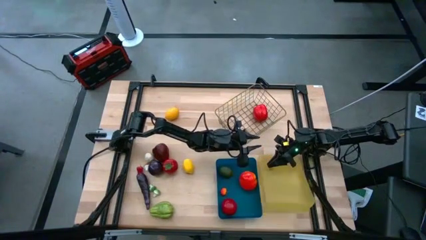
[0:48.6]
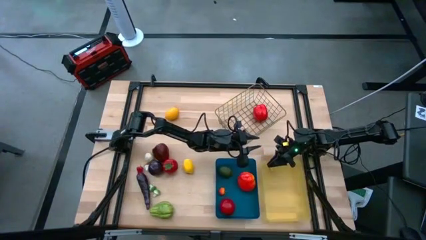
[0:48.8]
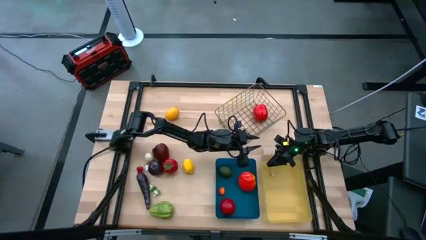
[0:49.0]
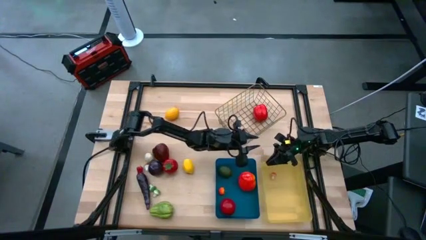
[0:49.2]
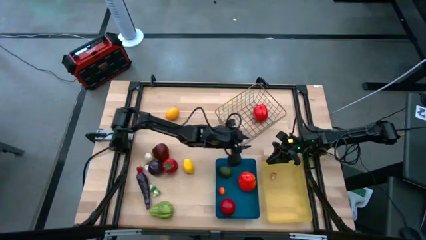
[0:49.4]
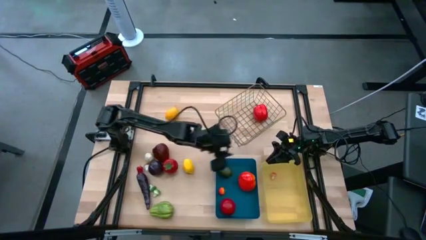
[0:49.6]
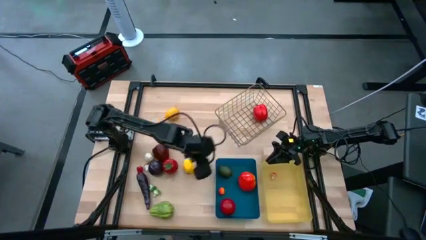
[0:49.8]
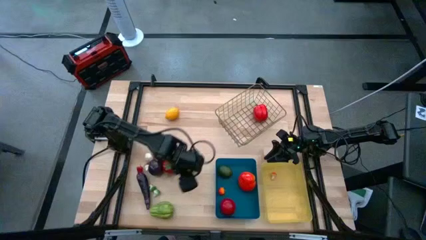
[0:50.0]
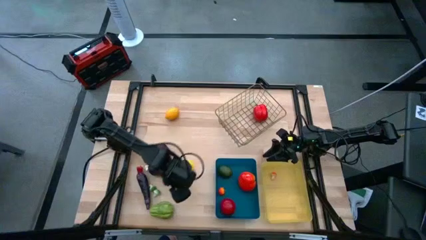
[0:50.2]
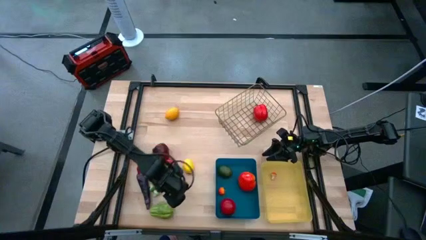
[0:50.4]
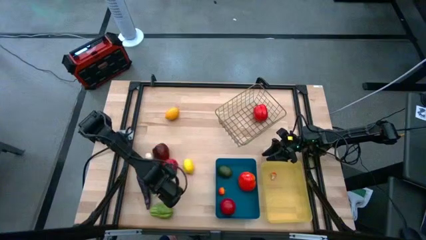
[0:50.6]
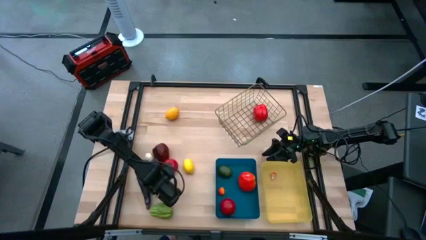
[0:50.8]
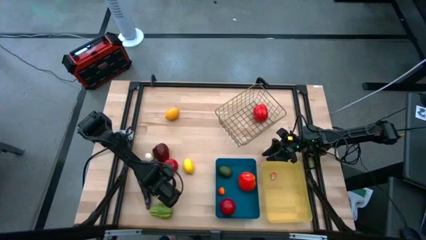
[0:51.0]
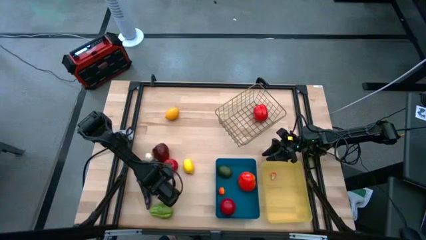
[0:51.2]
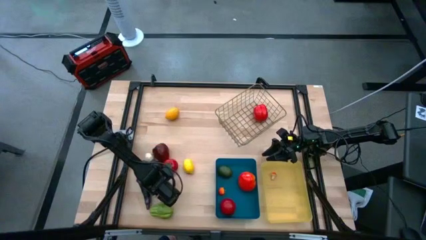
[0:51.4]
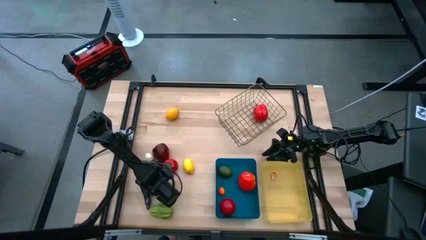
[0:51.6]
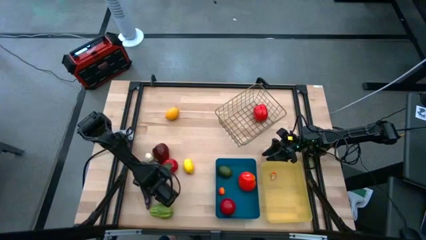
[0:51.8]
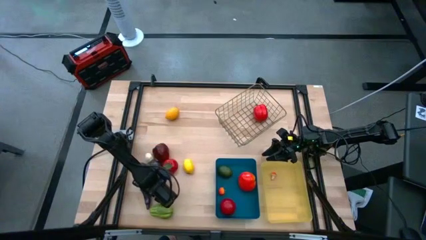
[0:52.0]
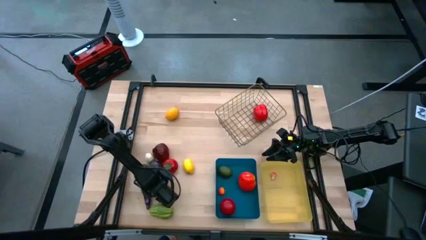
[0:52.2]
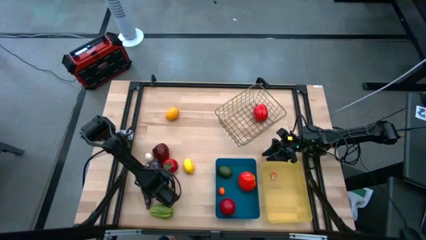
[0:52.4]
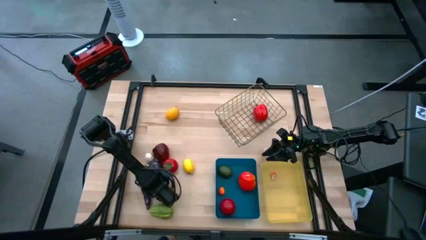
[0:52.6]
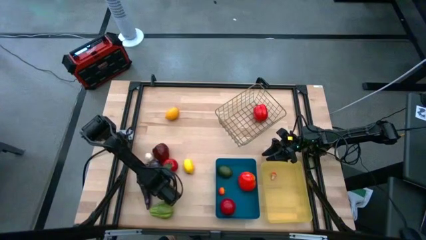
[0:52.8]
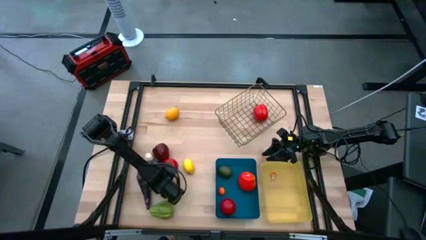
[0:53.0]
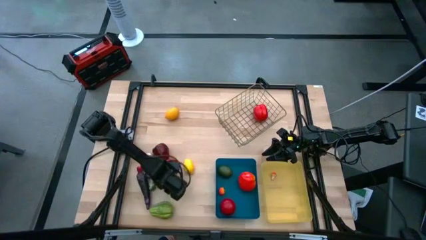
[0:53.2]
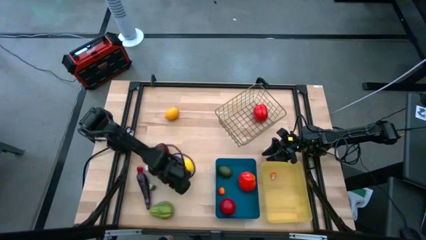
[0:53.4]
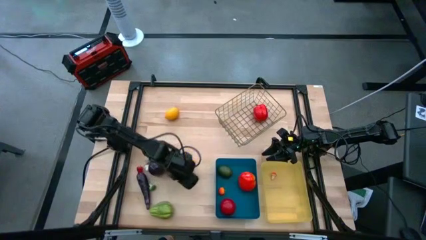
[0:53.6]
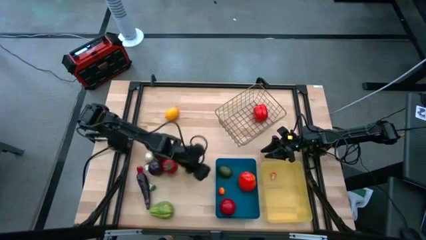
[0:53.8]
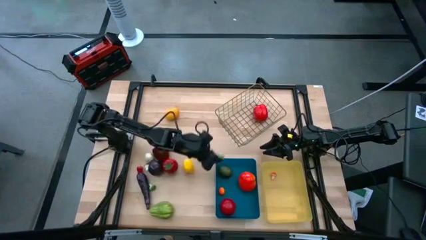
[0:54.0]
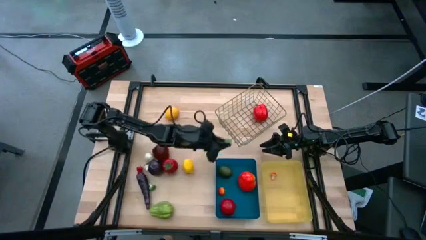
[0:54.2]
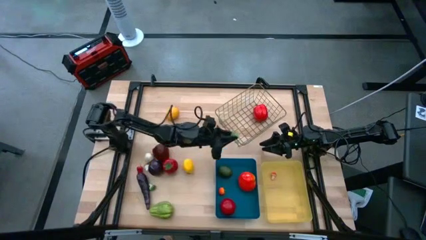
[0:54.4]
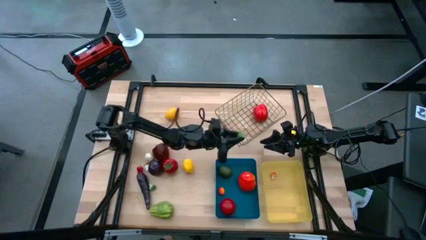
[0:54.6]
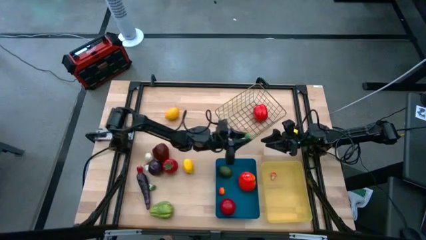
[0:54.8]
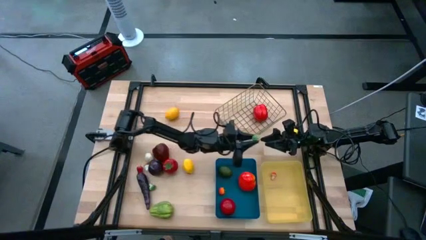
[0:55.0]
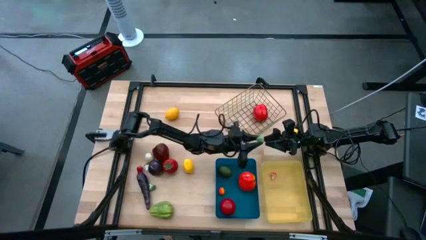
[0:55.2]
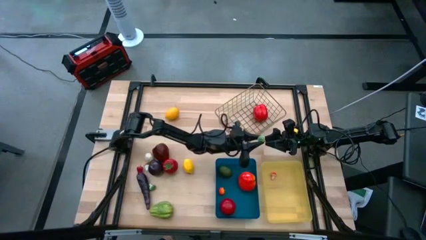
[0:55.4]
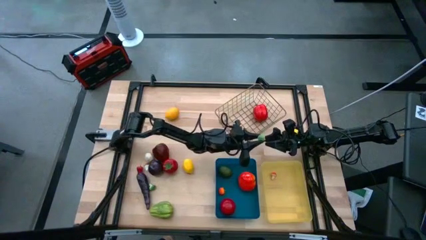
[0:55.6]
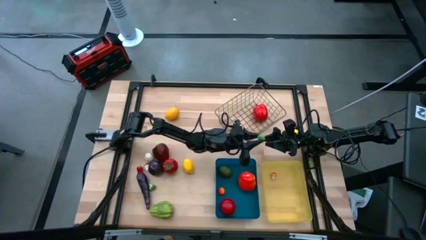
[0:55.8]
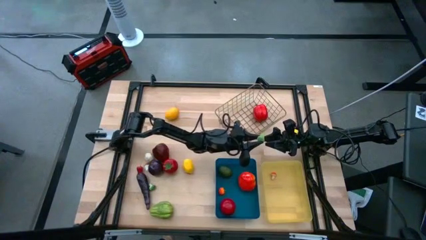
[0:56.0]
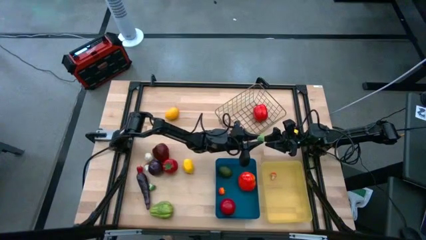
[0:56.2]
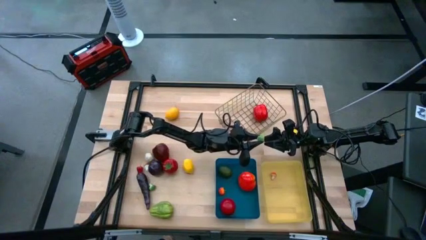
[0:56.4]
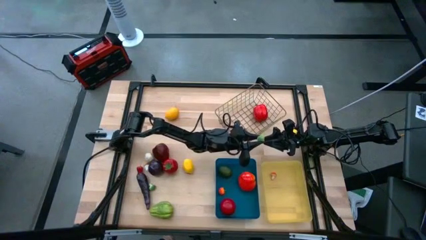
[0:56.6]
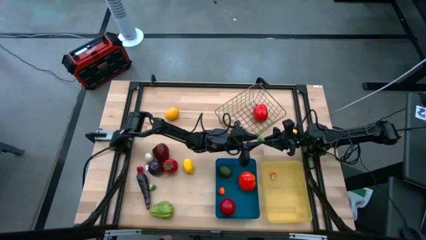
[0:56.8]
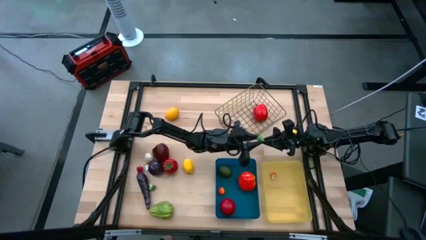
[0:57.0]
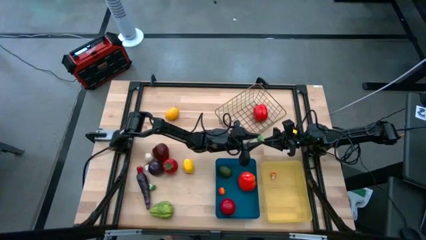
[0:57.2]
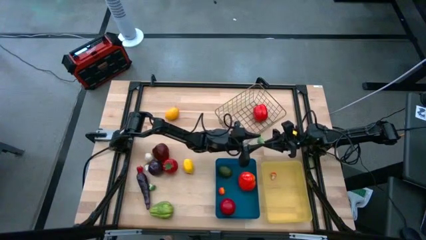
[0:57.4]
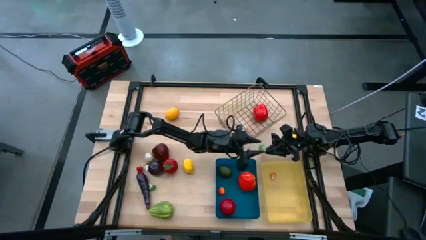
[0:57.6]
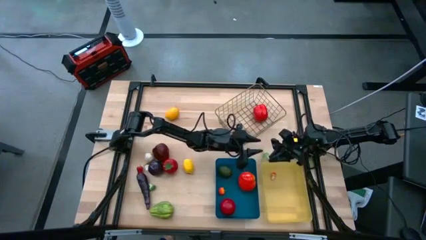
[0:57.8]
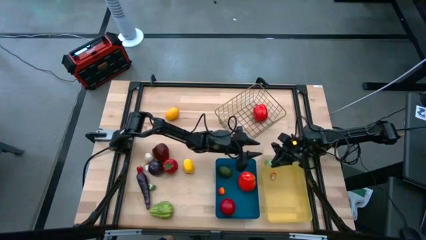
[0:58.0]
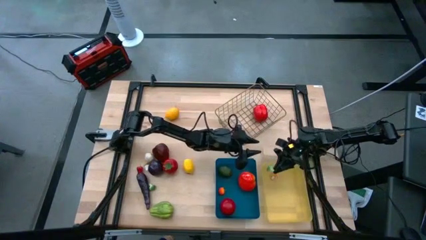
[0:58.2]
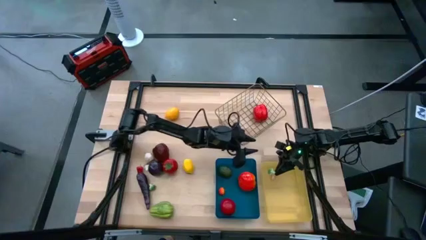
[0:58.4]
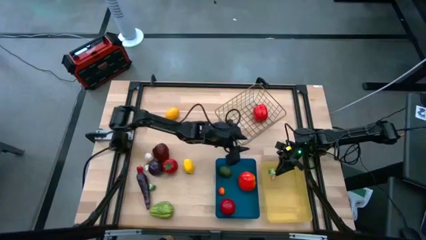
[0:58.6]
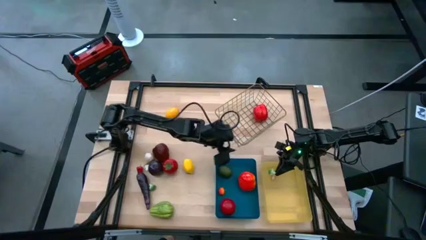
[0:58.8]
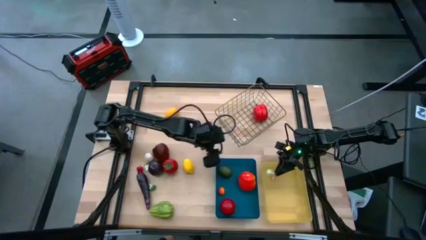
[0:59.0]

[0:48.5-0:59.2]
Task: Sort produce into baskets
Put the bottom green mushroom into the yellow bin

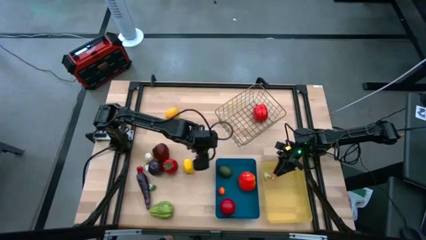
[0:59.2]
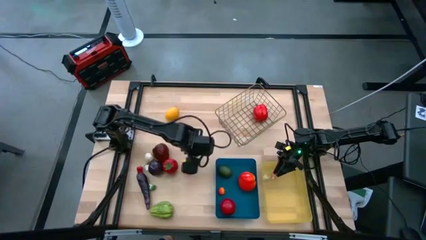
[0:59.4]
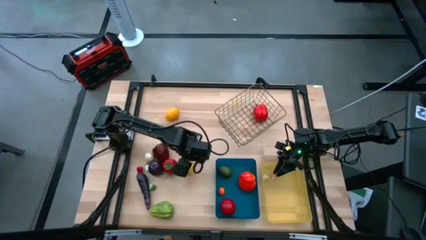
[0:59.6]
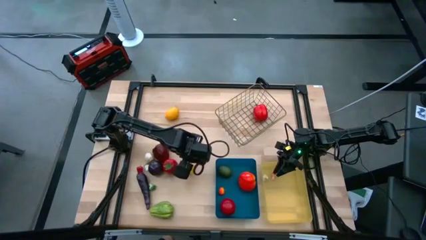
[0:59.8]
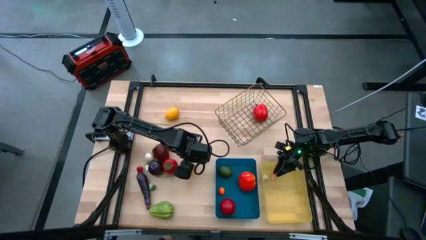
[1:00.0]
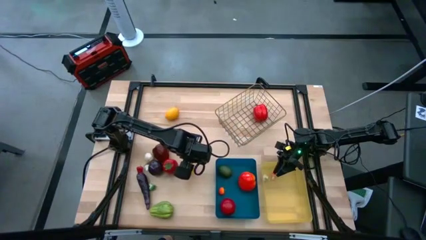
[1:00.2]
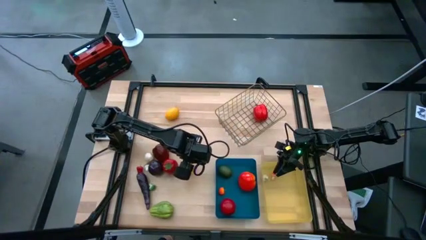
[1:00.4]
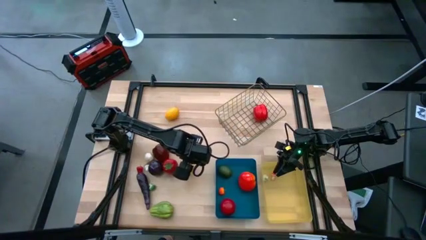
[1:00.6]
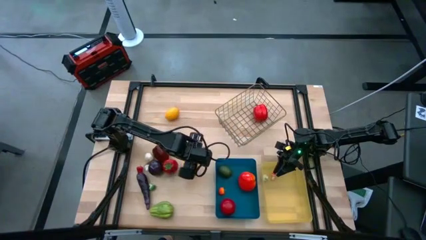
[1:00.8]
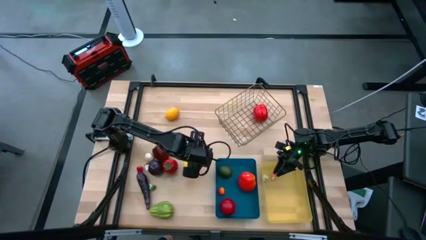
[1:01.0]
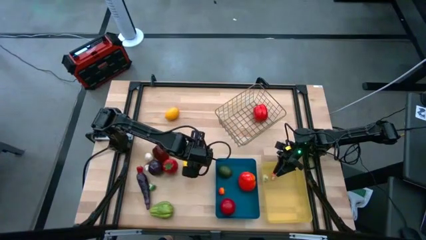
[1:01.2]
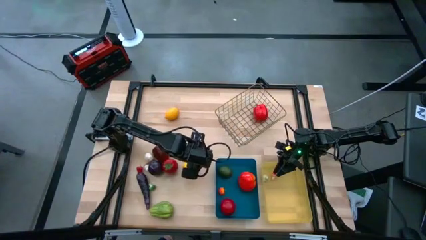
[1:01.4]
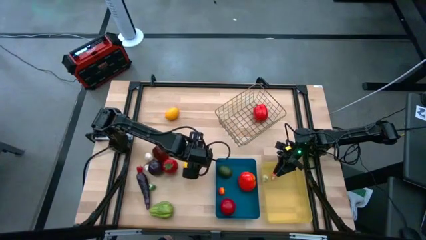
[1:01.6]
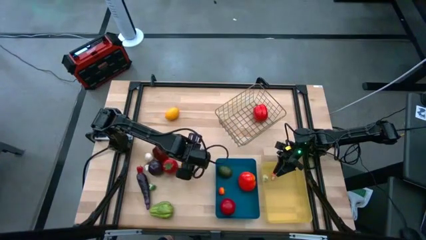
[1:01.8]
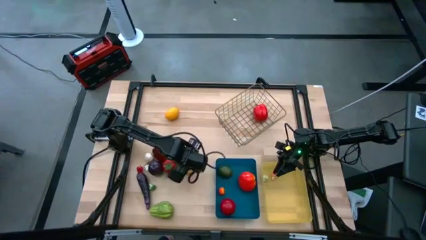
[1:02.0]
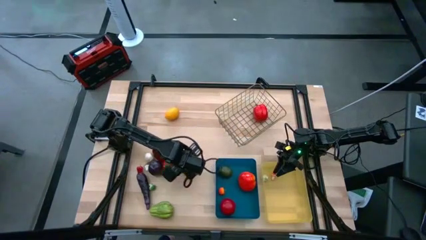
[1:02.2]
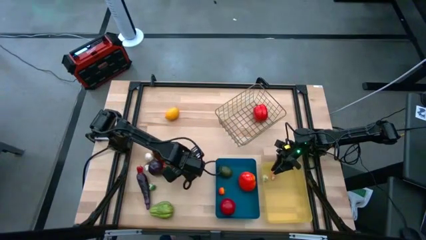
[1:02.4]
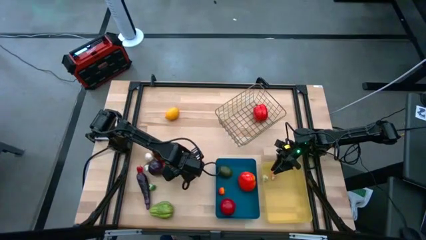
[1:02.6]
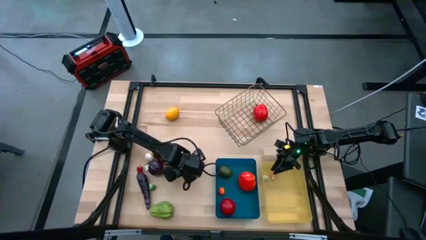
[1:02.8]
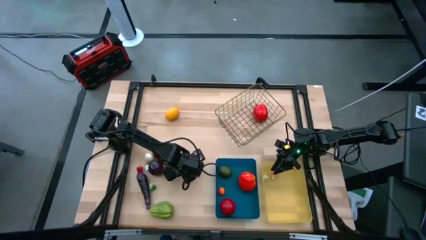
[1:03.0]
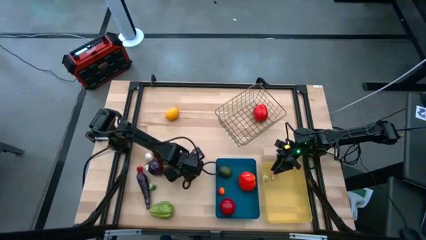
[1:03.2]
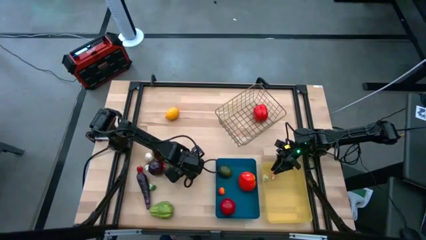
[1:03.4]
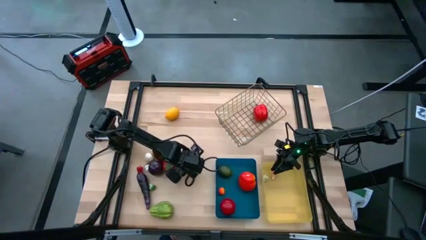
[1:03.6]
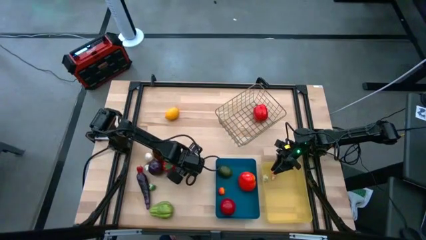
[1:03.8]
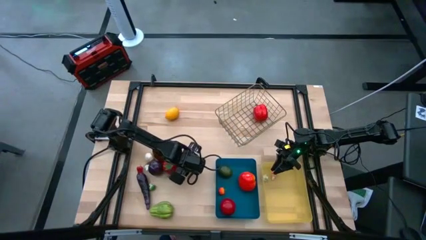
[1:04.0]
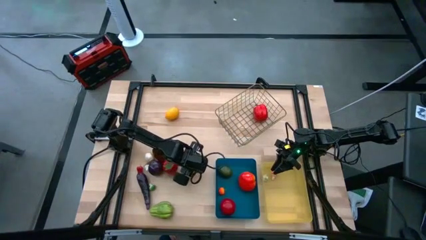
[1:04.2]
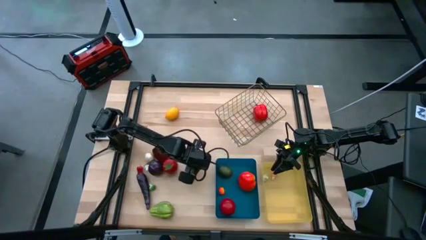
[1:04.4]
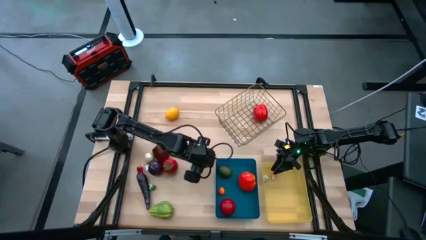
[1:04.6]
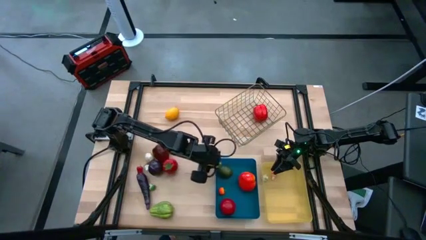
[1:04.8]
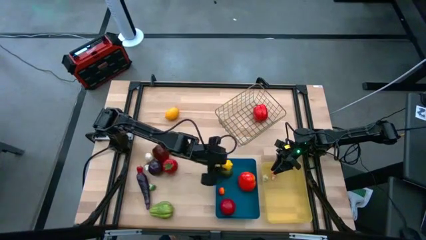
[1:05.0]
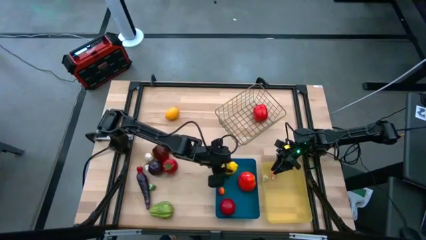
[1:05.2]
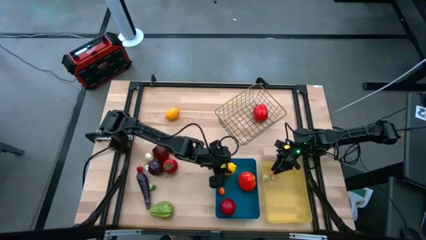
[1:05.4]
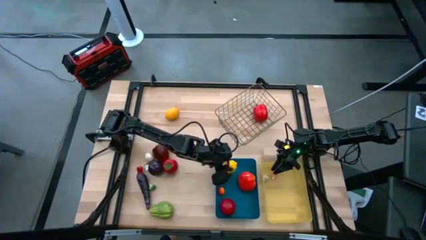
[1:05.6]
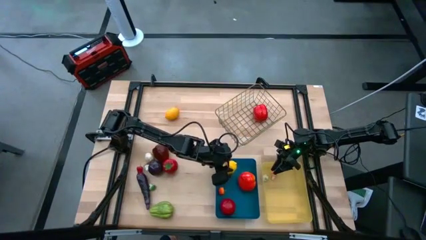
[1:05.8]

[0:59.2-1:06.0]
Put the bottom yellow lemon into the blue bin
